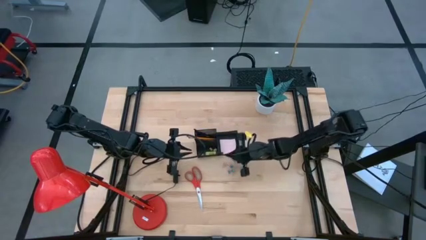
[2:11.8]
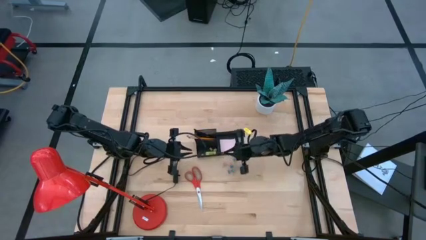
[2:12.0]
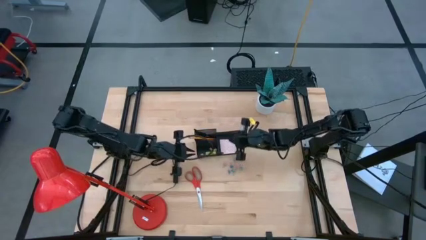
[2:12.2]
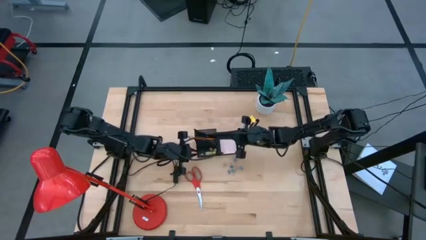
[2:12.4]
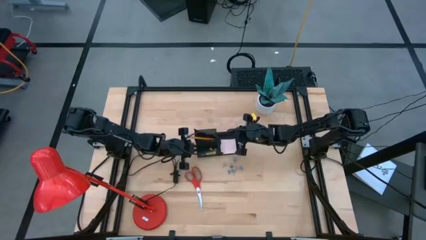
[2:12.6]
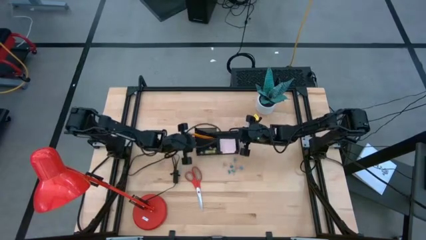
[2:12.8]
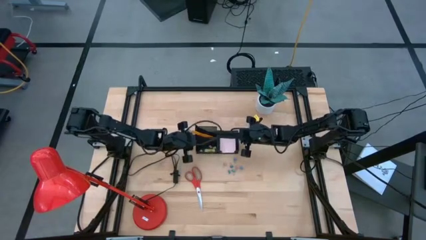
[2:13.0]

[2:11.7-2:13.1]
Task: Pick and place office supplies into organizer
Adjust the black desk organizer

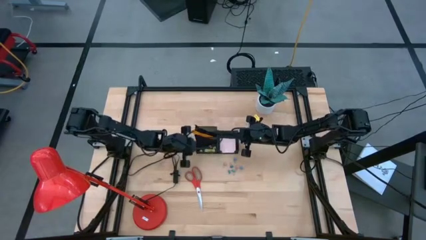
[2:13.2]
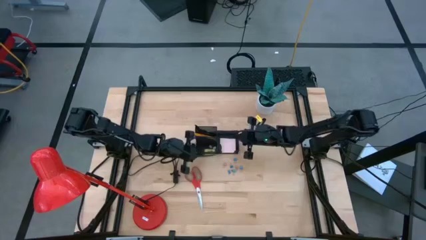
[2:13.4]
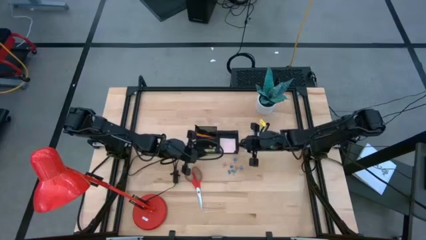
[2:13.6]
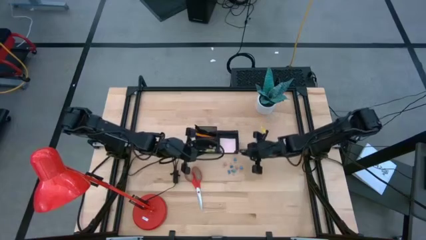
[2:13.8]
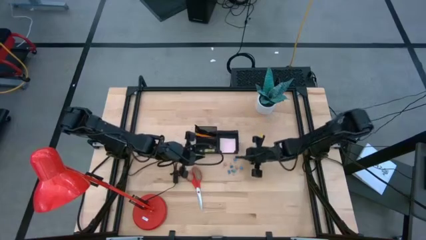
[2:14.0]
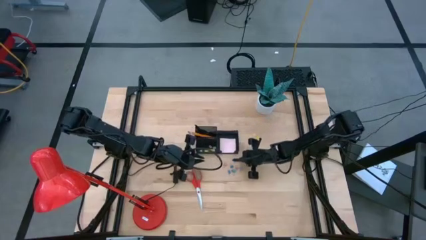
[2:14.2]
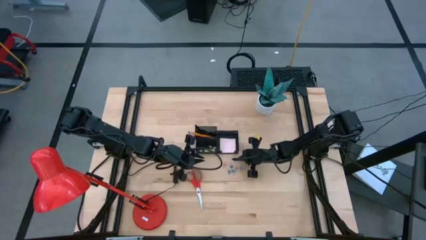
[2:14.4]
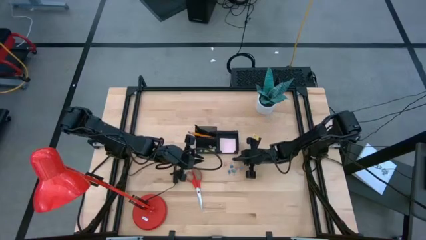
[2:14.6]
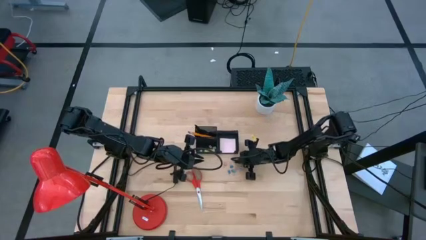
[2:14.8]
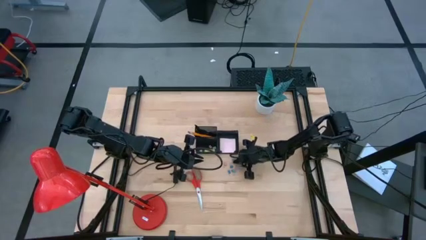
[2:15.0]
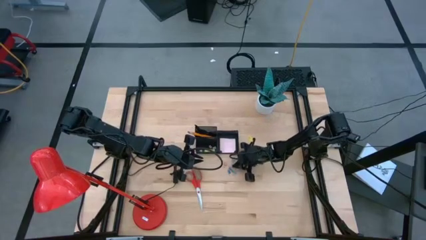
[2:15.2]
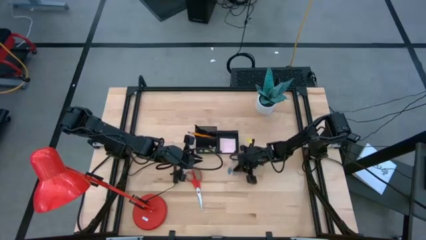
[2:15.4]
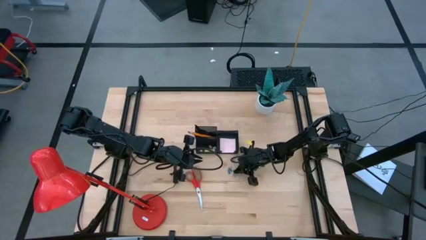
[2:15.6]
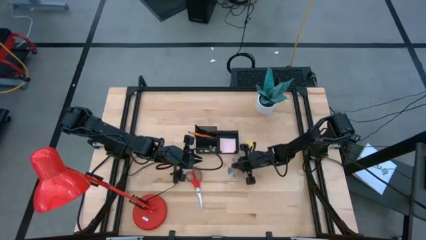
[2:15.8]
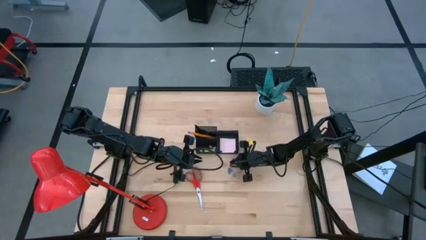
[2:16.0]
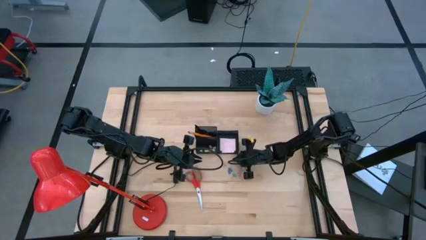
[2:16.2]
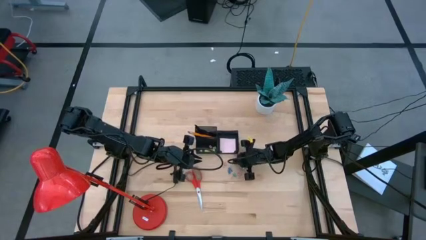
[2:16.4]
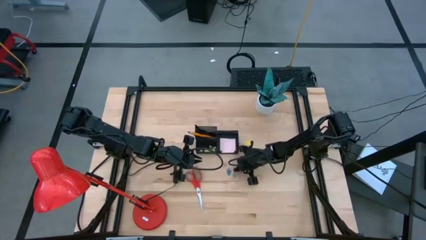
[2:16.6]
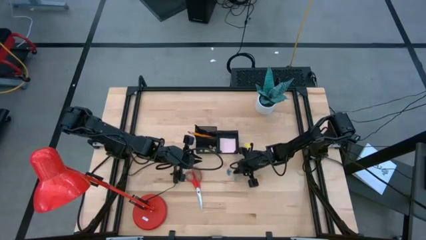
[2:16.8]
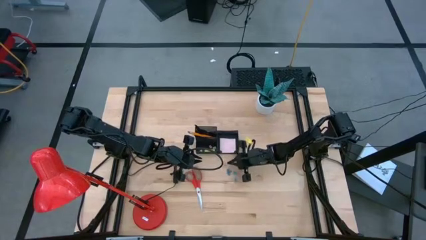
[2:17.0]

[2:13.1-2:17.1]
Adjust the binder clips on the table

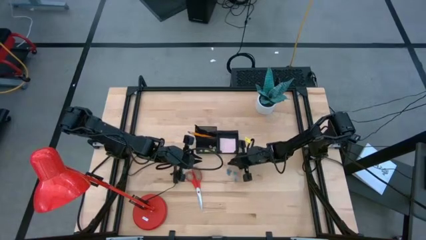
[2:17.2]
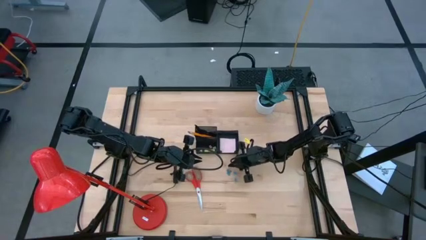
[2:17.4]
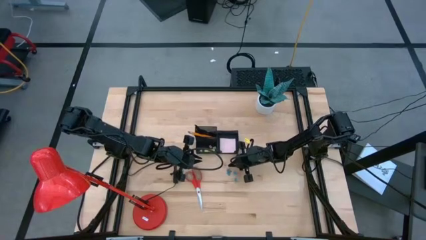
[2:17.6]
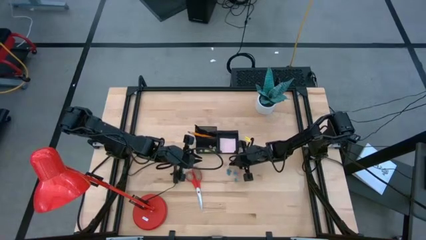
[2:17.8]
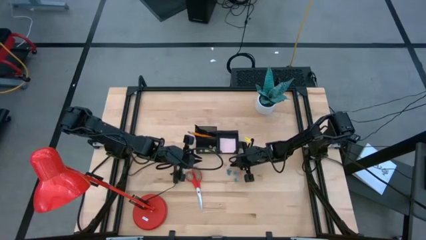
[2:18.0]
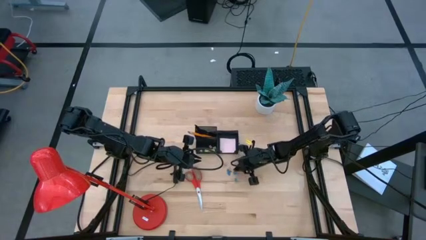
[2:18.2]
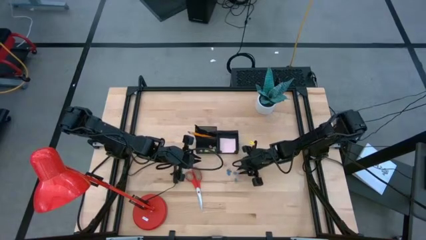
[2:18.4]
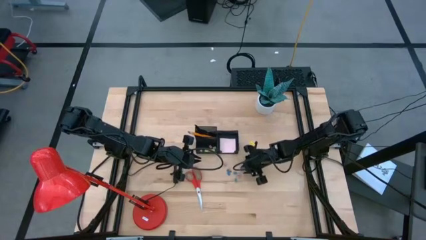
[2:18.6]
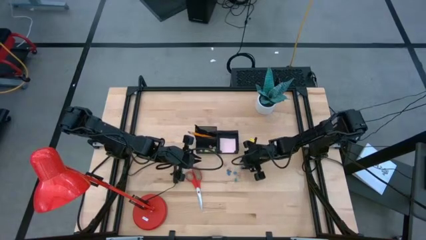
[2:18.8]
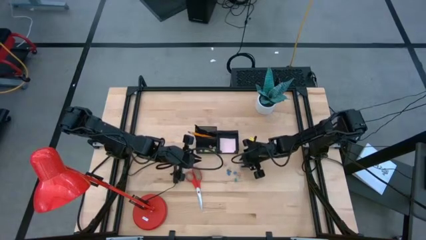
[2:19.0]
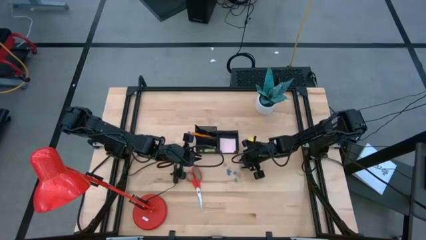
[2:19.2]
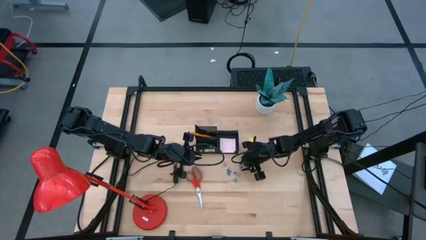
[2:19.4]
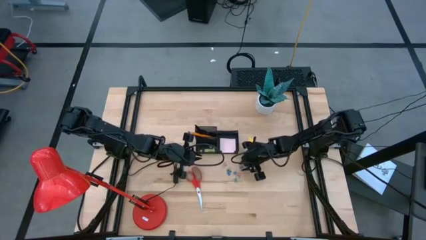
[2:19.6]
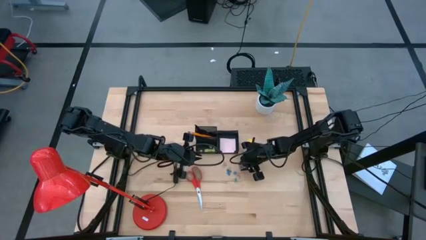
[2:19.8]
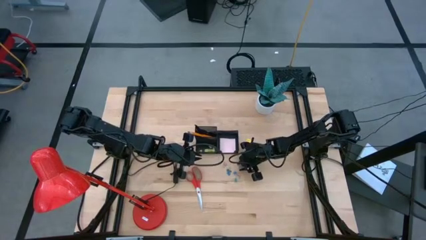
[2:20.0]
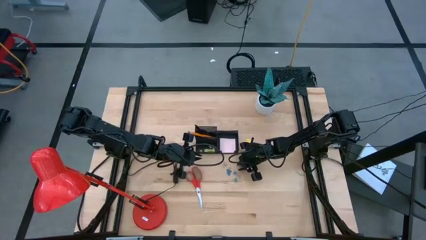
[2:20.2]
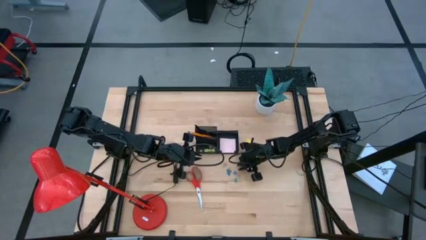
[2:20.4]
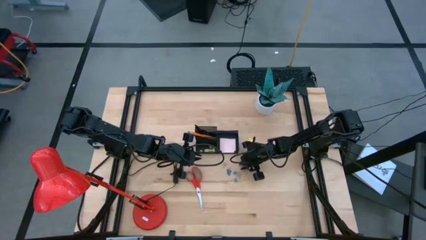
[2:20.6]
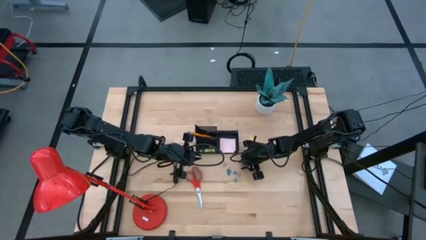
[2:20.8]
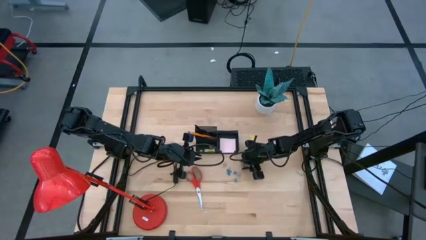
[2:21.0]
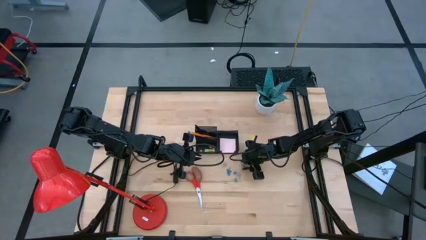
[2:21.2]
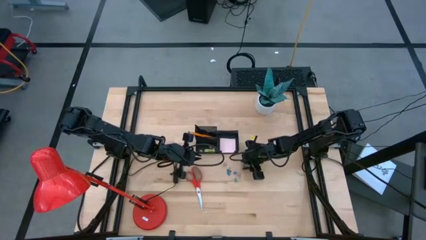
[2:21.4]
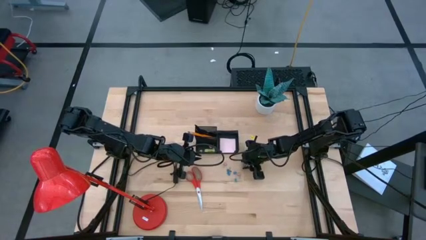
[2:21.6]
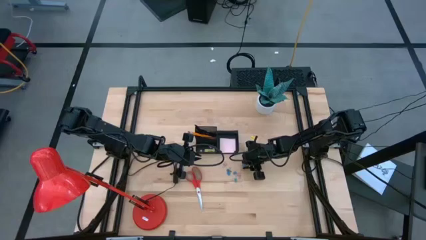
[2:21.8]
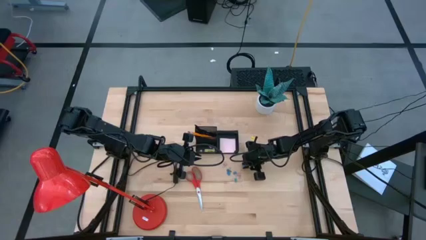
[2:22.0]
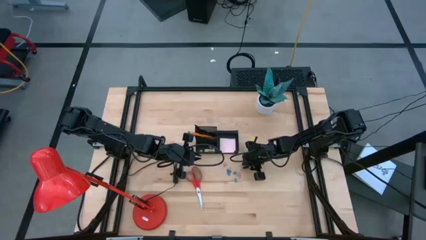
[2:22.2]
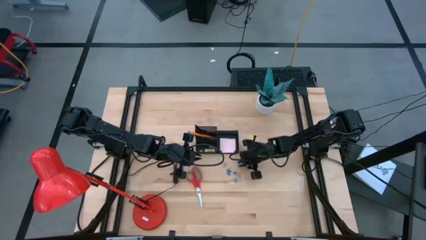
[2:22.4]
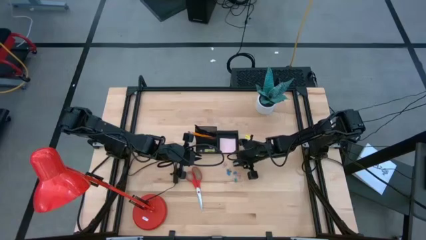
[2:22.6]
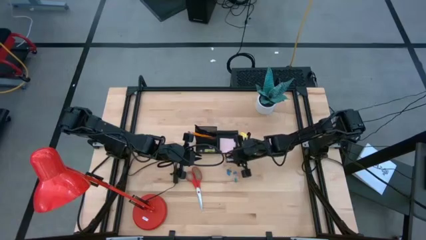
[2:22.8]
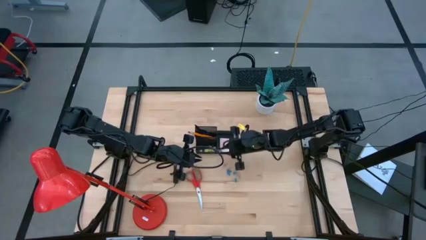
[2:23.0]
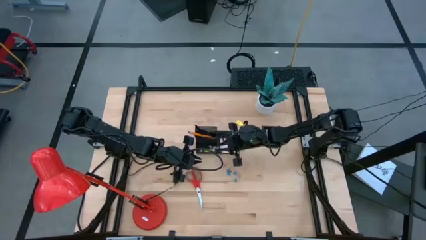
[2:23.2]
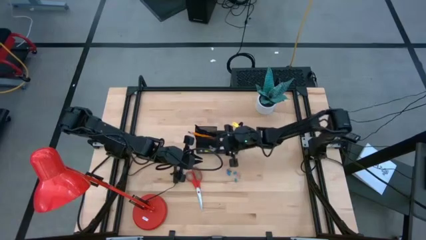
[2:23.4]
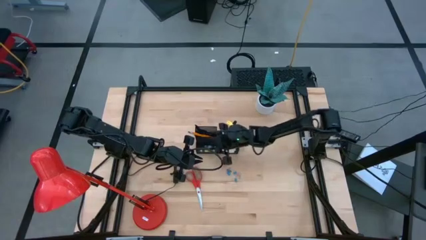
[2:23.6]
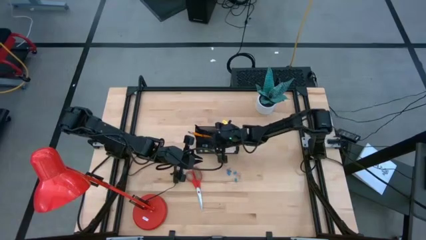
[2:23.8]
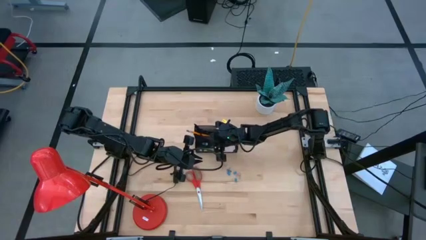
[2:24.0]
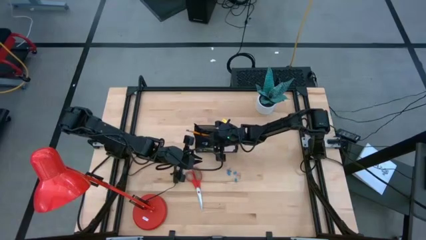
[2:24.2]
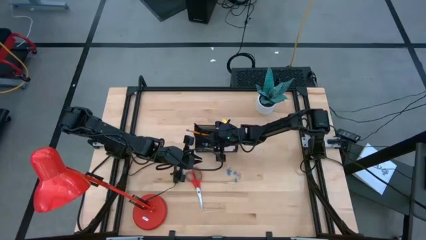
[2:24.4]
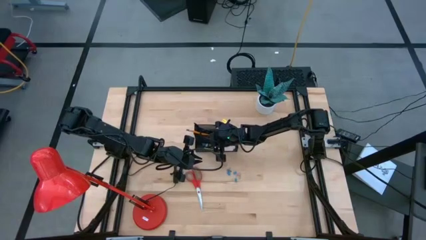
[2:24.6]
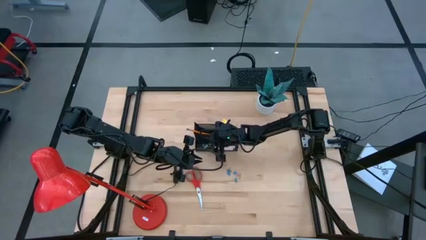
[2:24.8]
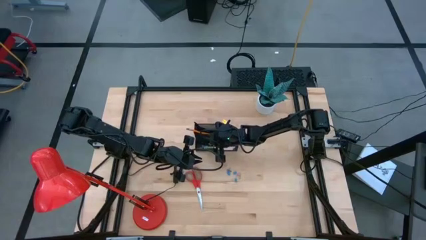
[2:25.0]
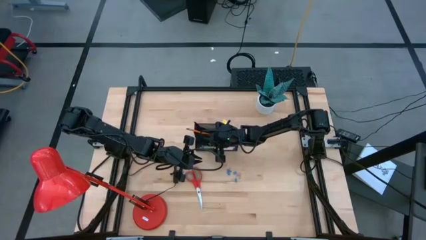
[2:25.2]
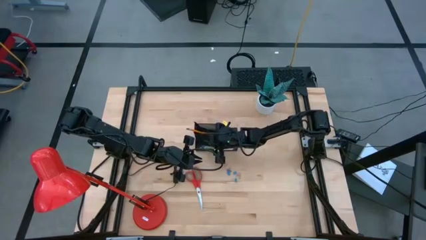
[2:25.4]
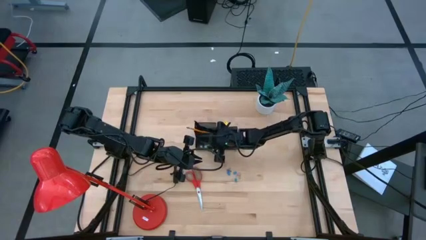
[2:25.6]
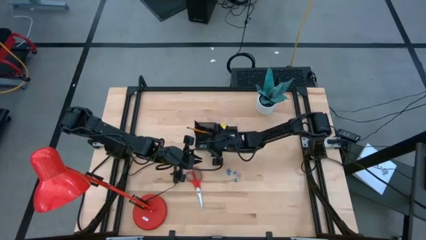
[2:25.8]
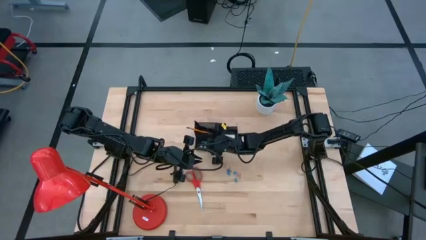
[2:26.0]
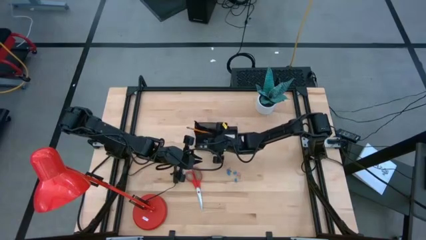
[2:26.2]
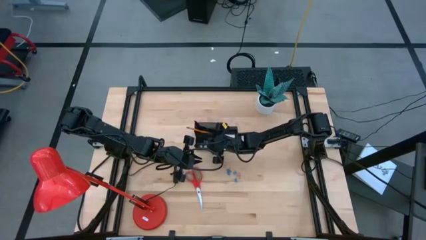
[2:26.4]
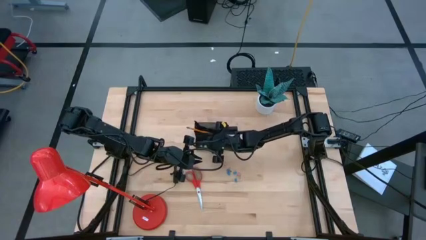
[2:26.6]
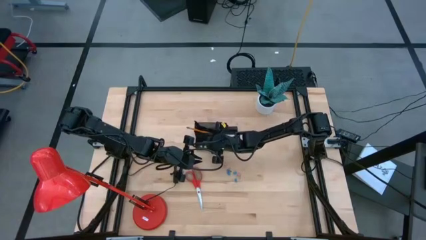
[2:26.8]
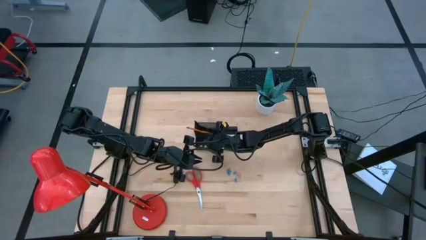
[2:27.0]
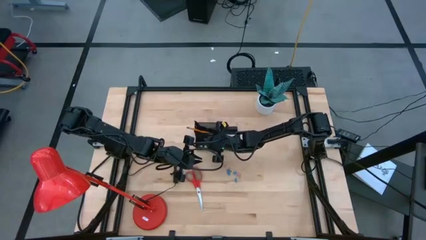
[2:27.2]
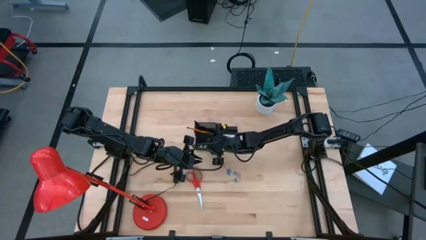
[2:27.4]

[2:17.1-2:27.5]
Put the blue binder clip into the black desk organizer

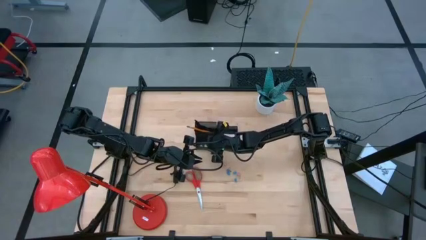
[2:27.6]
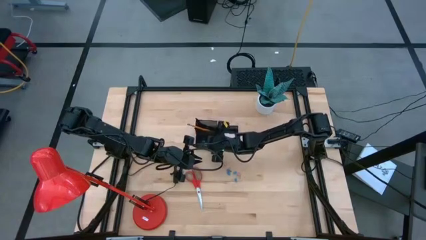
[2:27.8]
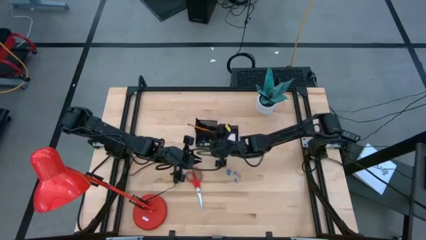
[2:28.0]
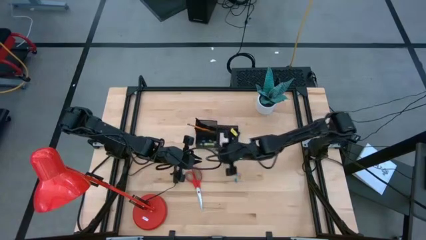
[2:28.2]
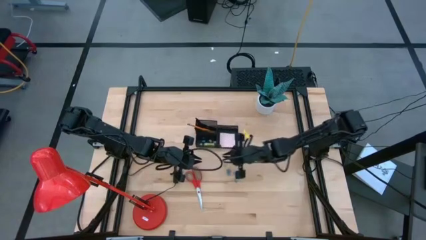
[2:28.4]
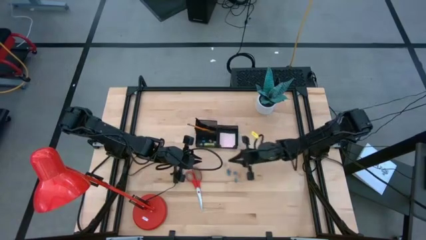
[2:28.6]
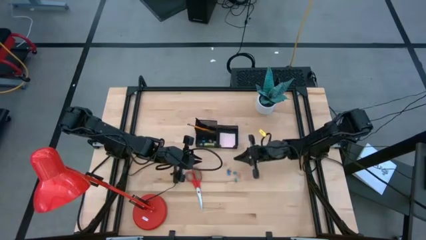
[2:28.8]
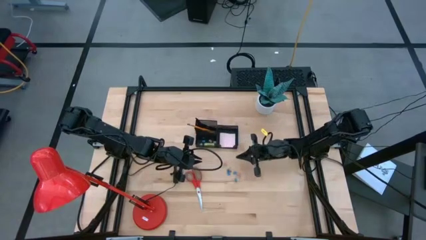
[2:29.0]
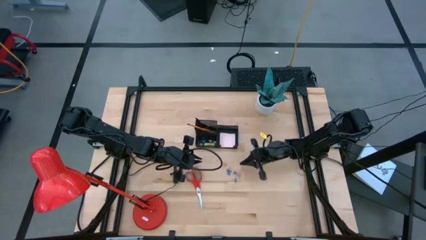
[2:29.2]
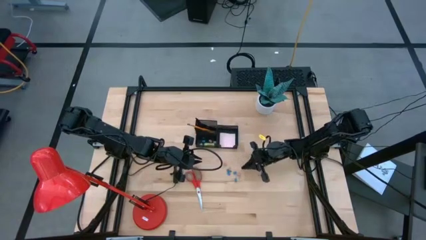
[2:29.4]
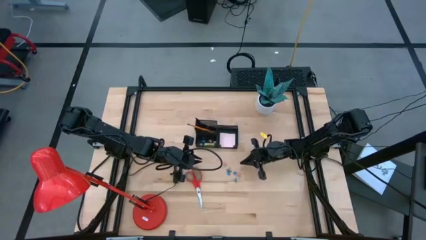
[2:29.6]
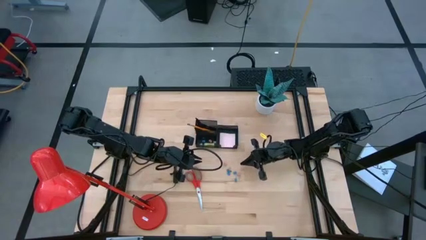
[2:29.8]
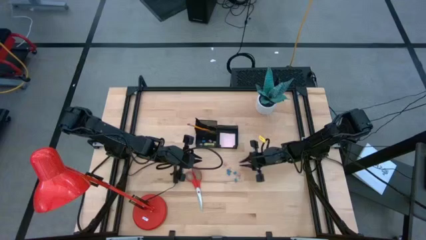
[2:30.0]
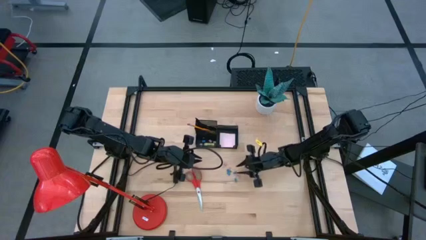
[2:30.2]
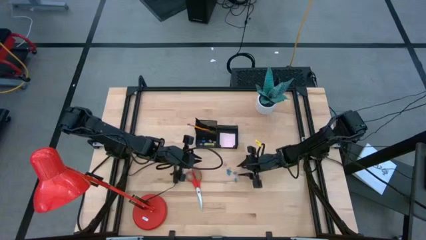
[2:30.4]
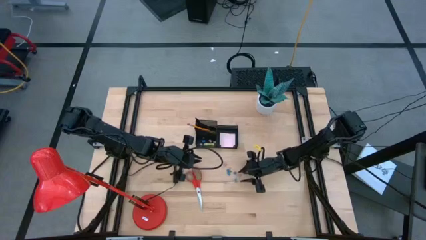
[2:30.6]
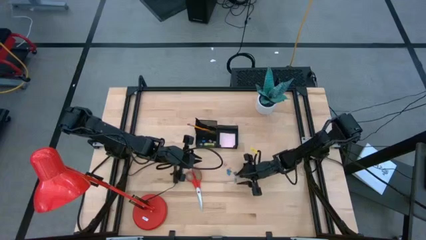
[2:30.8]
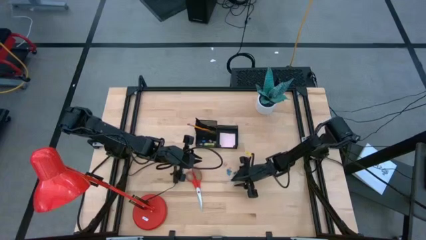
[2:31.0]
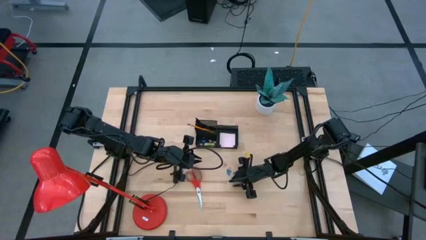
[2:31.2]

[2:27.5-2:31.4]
Put the blue binder clip into the black desk organizer
